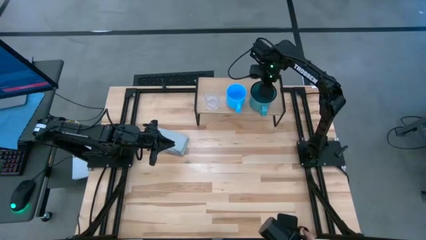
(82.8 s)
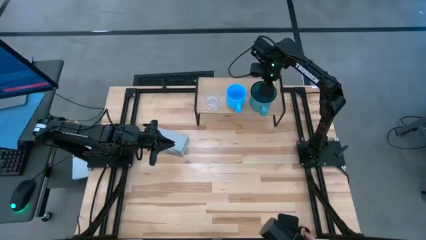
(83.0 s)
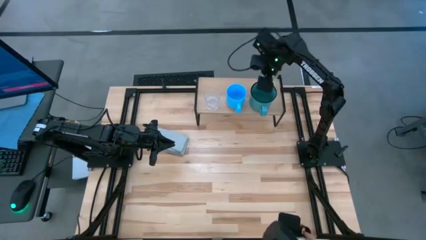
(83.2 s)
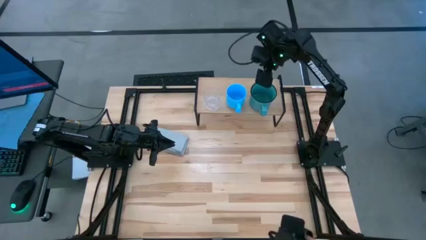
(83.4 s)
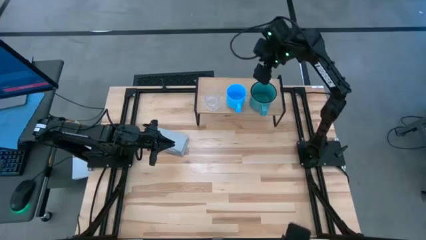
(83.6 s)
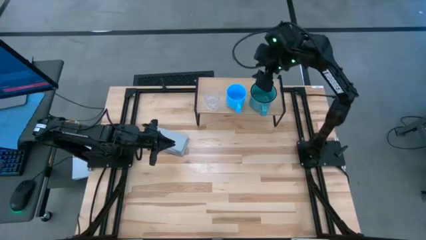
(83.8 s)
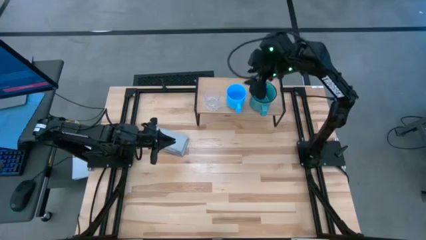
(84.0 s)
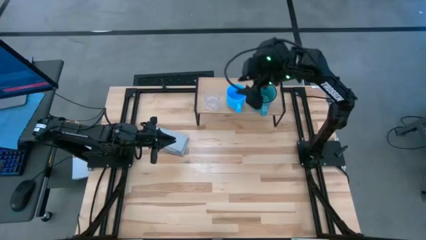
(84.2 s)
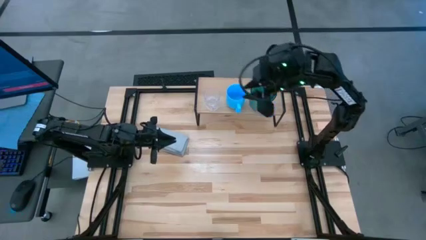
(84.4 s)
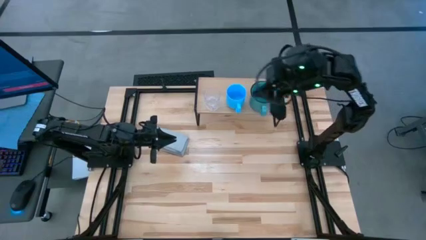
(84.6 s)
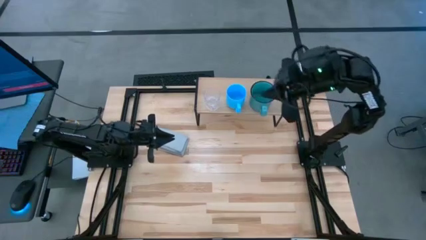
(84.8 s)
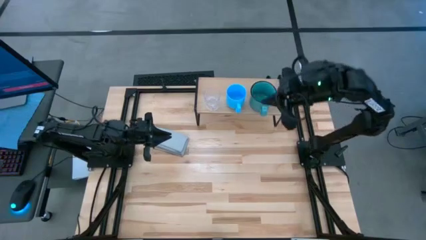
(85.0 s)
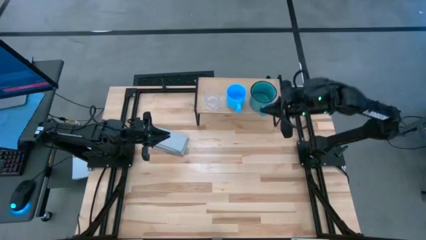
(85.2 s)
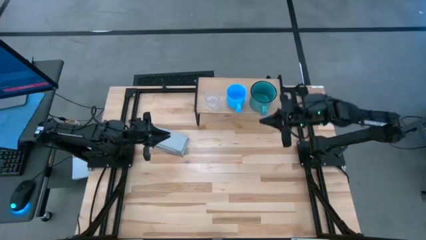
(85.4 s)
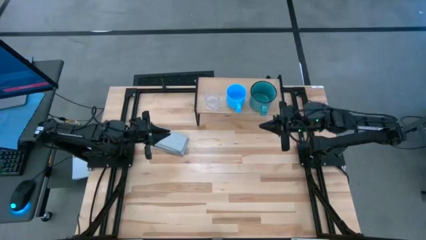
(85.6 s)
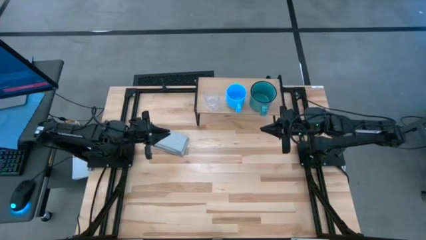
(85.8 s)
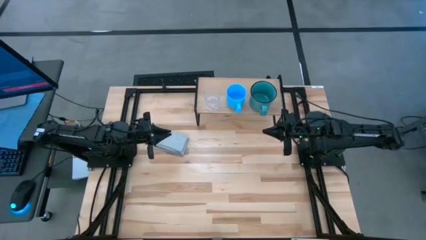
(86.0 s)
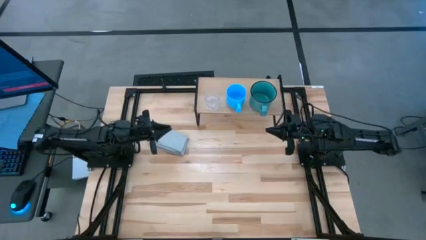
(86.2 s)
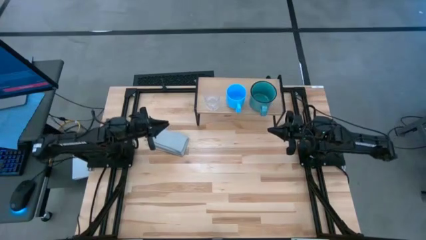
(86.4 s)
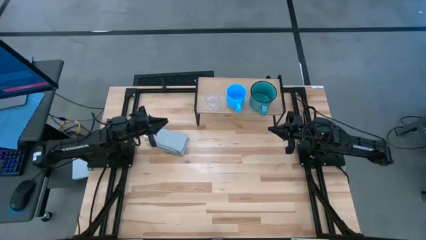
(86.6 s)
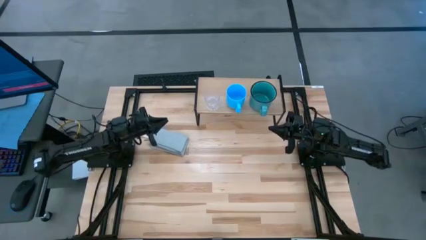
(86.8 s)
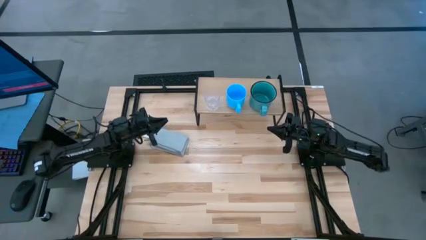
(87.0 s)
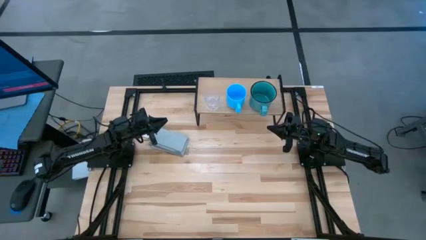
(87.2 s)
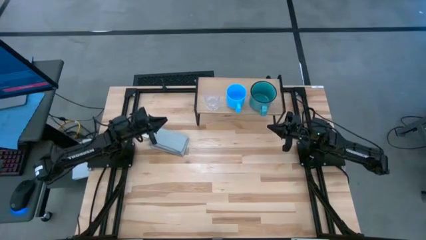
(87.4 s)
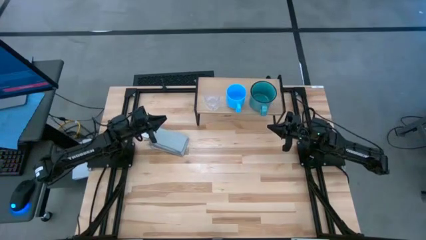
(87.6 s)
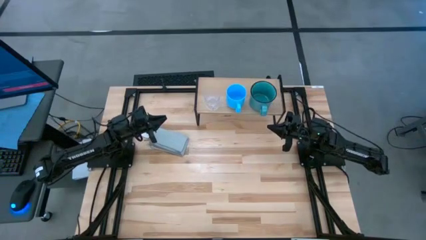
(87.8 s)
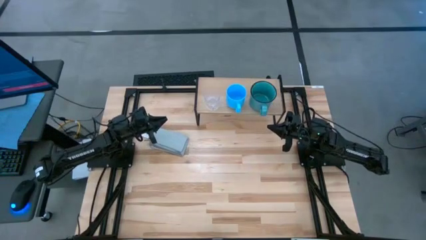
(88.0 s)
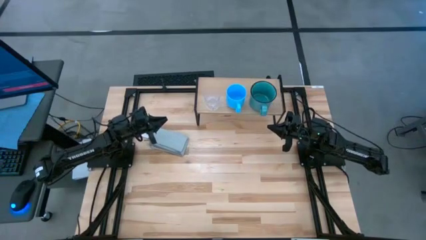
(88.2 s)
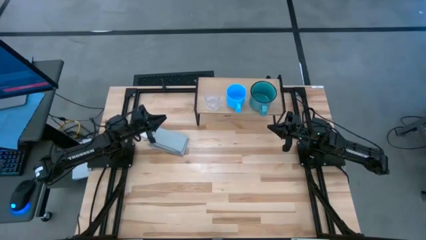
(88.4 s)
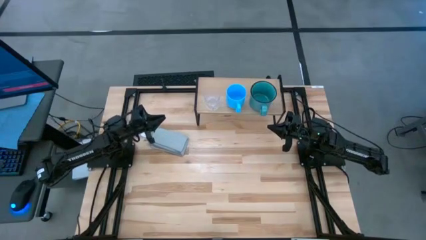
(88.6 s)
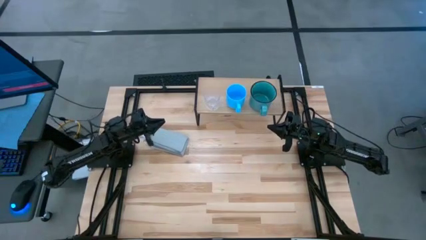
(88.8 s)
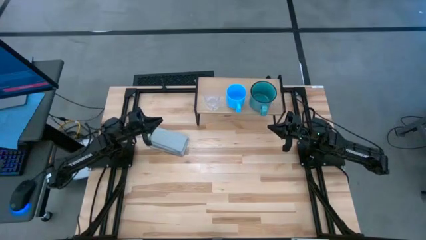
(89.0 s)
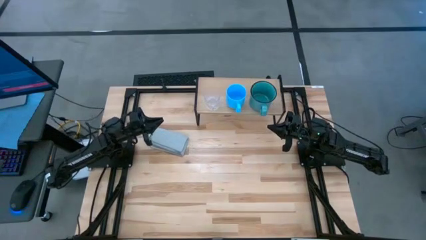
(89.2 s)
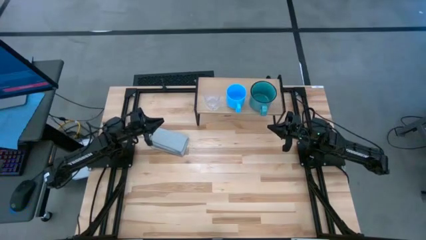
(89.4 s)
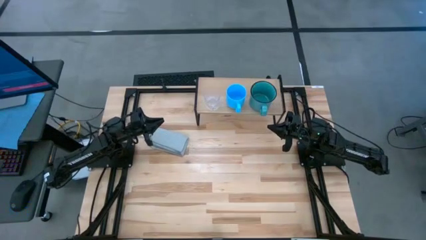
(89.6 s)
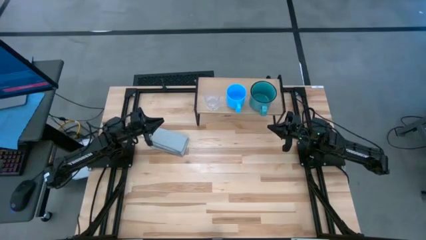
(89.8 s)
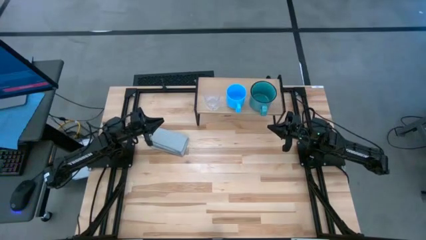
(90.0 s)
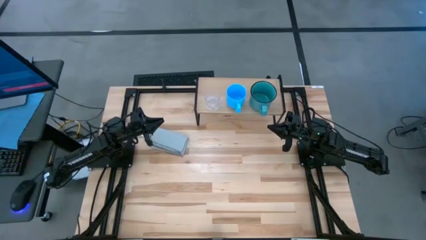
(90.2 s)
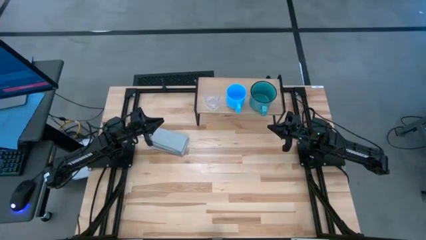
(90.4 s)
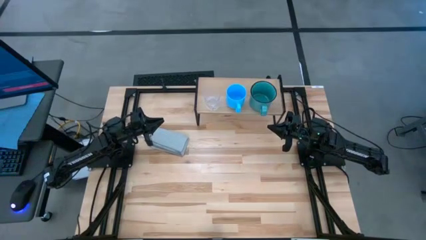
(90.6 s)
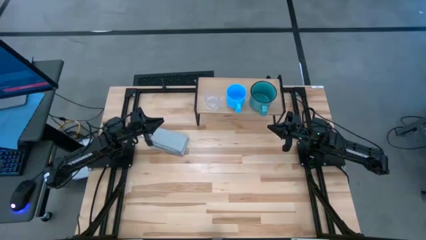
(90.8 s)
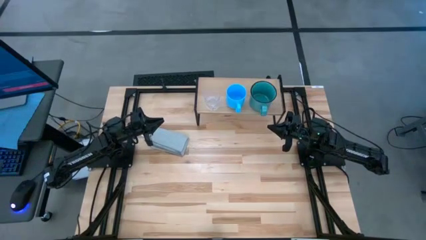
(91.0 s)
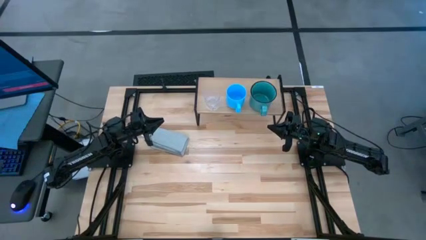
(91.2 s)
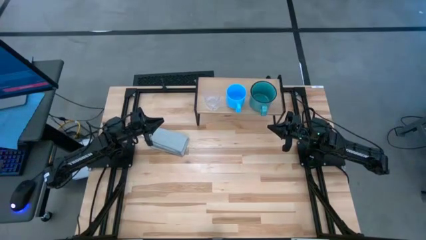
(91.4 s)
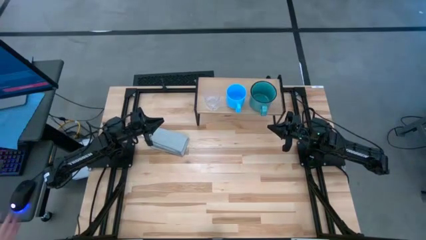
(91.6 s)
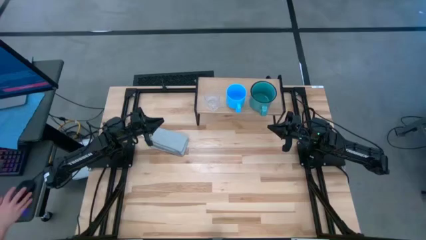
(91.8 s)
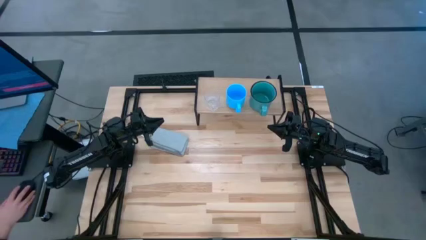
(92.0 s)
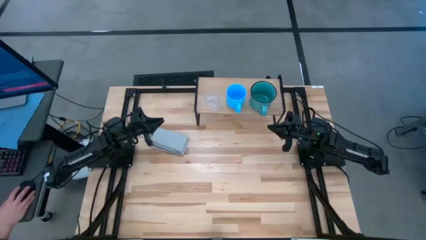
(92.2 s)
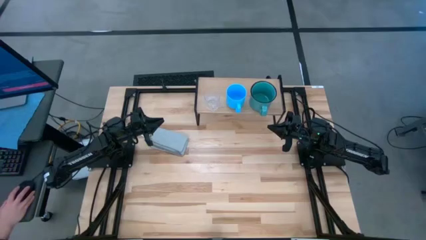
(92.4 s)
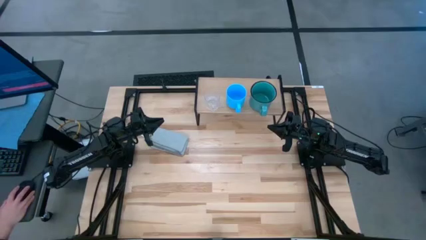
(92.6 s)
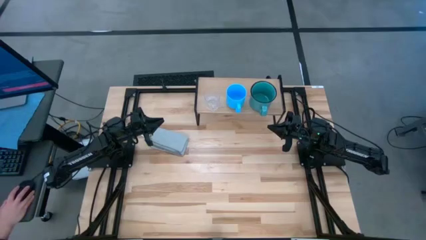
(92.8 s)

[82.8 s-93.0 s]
Task: Stack small to large cups/mugs on shelf
Return to Home Position

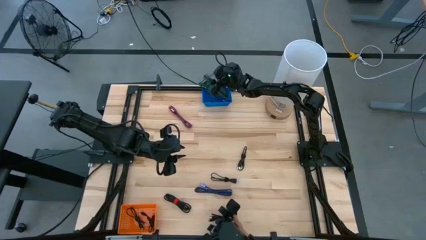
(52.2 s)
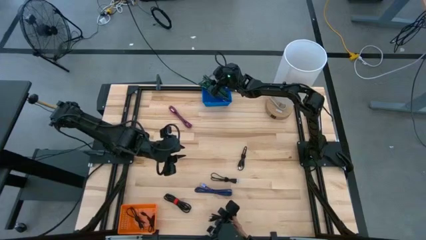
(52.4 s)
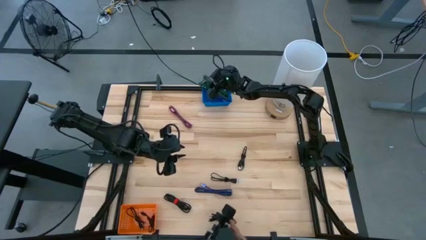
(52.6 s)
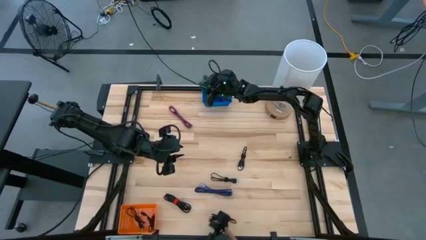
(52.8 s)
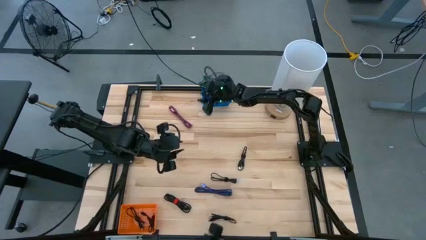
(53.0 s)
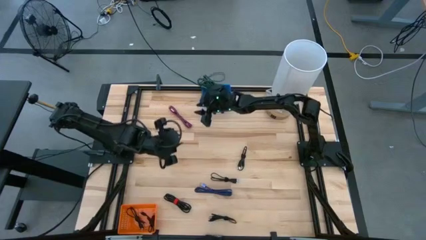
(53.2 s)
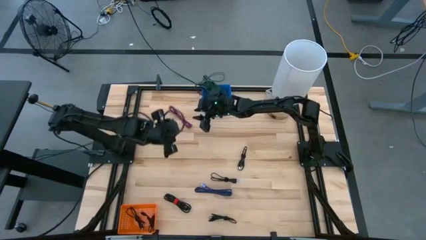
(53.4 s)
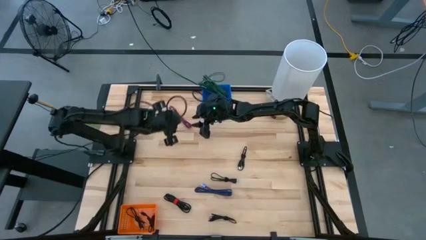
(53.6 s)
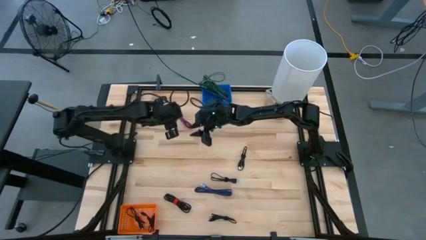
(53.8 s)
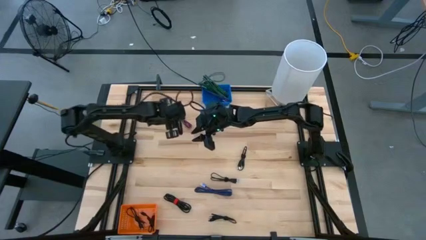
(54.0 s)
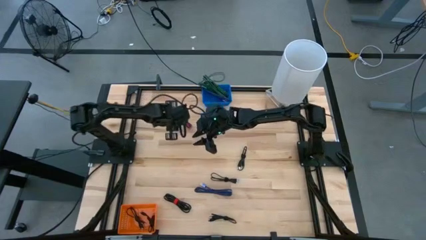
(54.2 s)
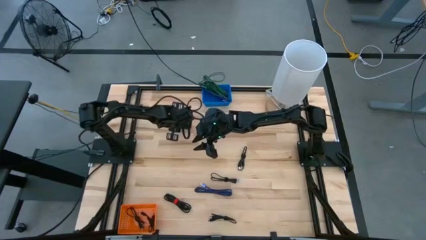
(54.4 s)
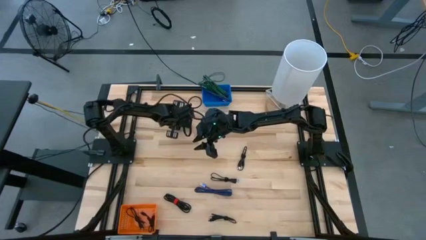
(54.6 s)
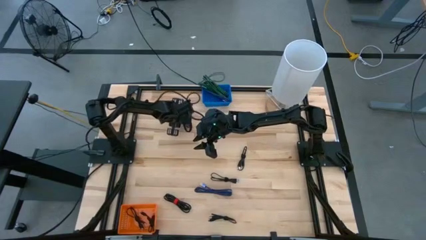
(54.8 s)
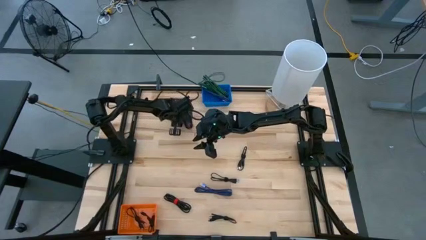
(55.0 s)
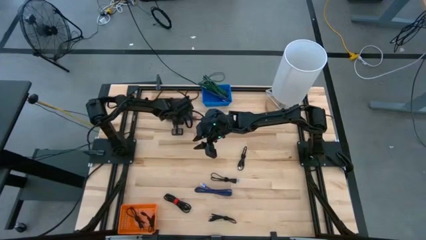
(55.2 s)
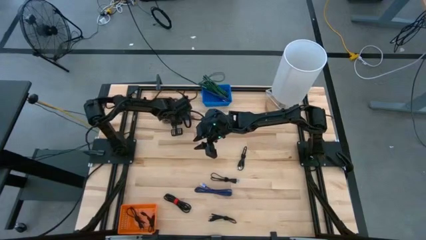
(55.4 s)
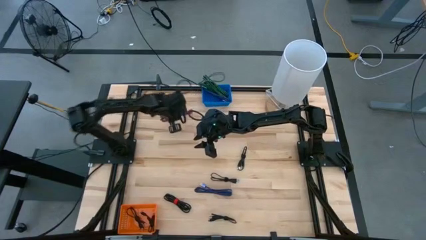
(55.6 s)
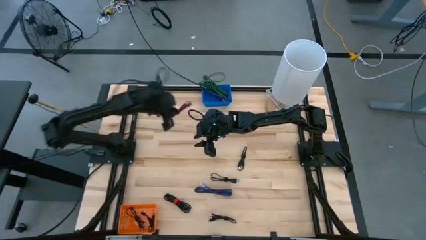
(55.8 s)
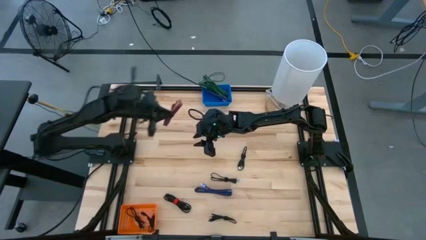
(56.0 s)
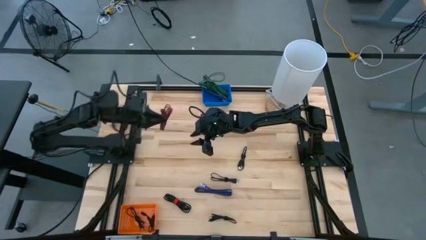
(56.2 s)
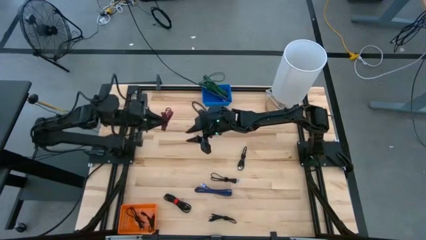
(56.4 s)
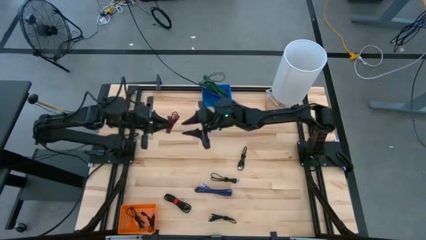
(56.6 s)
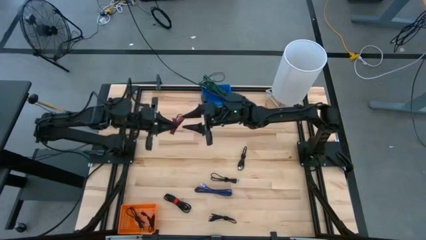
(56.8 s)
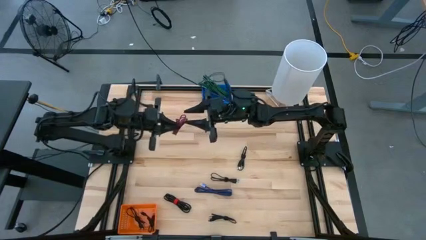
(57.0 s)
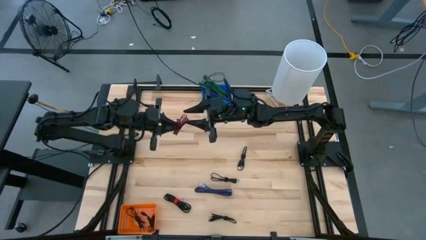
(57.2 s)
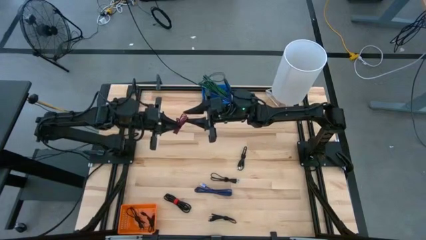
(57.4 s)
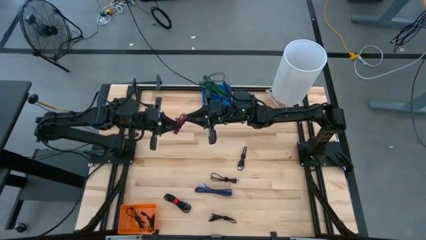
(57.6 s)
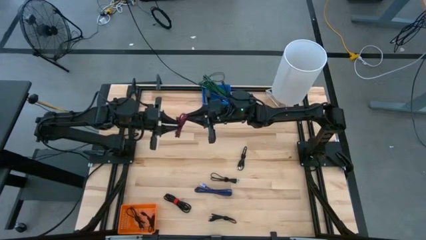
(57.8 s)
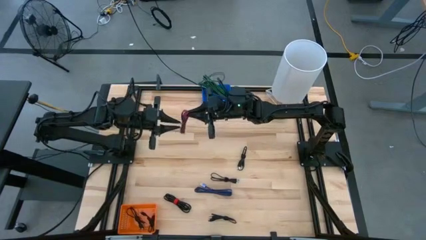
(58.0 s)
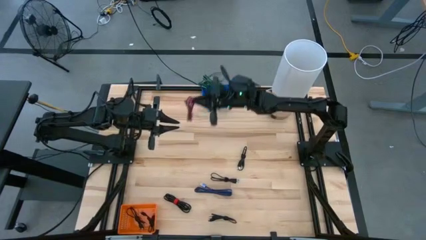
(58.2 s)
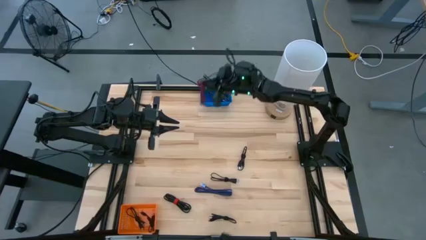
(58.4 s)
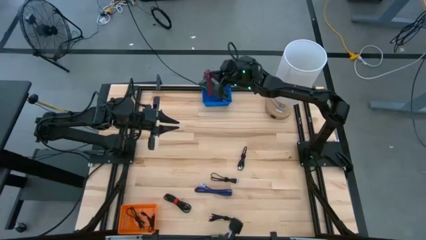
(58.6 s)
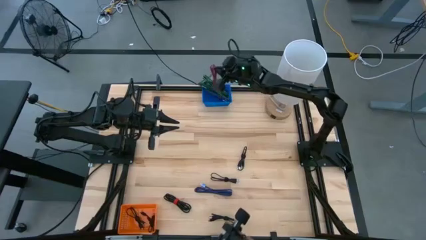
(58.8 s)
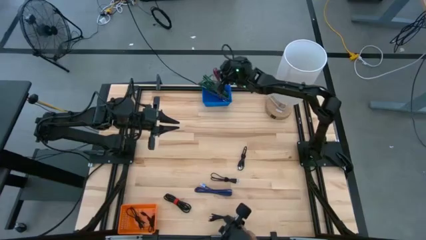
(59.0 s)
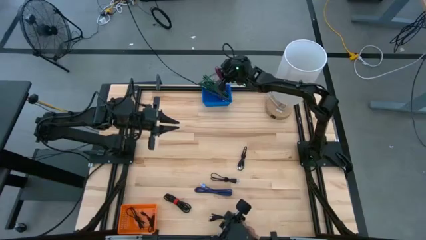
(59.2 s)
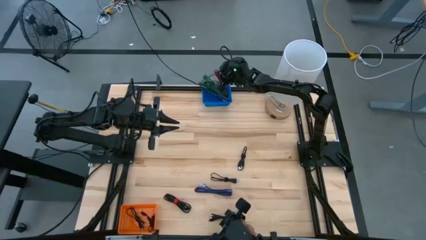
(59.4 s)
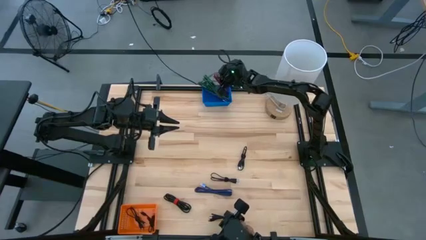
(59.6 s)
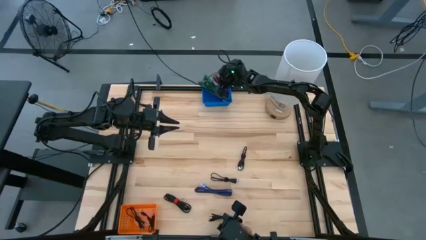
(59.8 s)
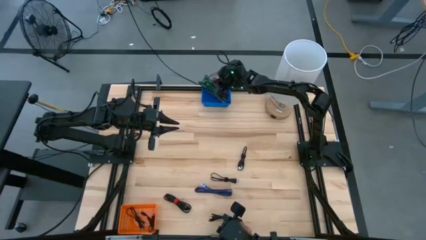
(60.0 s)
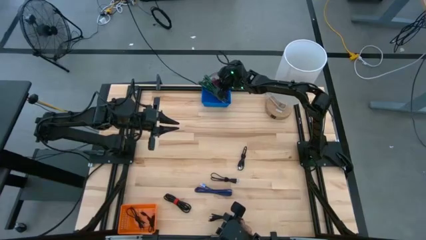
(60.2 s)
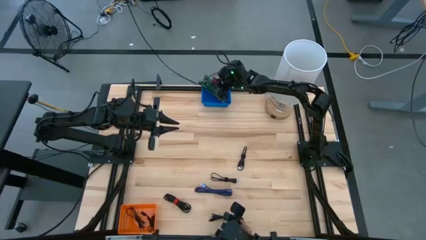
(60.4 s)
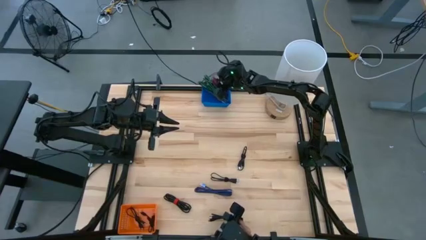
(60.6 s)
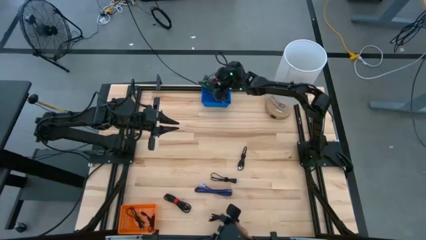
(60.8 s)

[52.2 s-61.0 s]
Task: Pick & Place USB Port
Put the red charger cable into the blue basket
